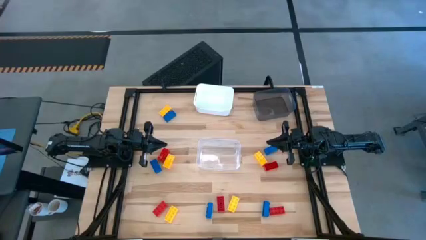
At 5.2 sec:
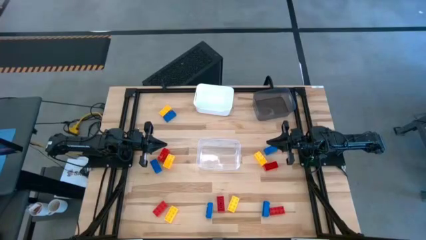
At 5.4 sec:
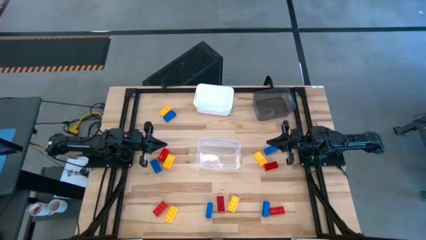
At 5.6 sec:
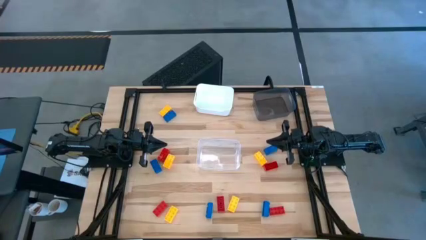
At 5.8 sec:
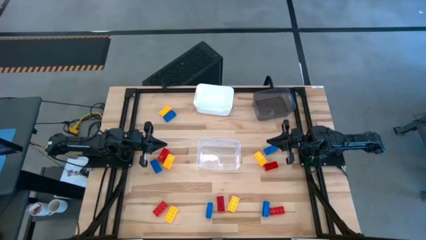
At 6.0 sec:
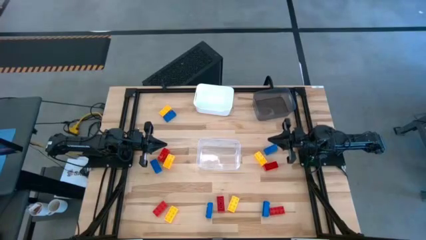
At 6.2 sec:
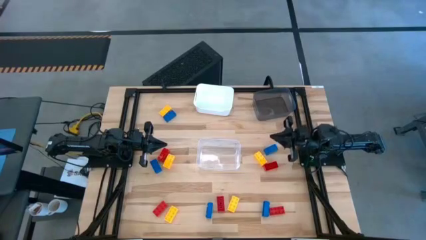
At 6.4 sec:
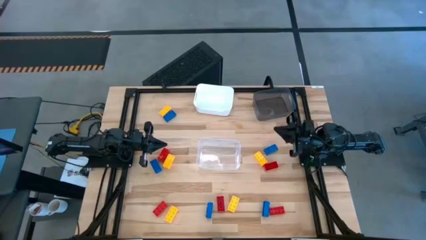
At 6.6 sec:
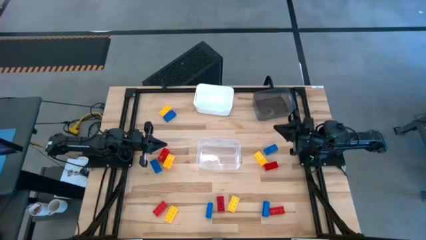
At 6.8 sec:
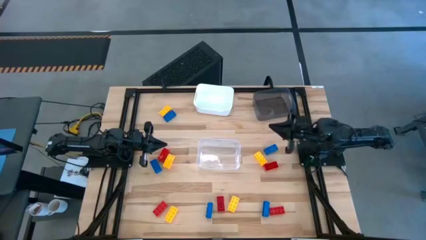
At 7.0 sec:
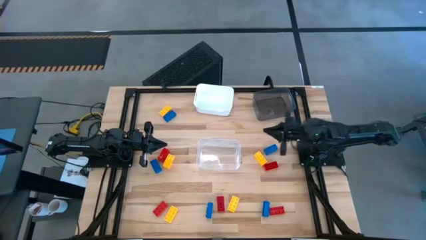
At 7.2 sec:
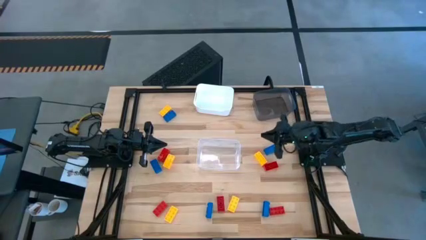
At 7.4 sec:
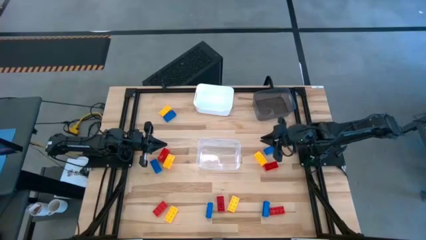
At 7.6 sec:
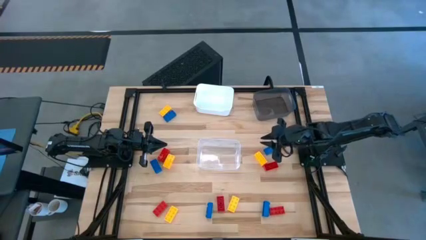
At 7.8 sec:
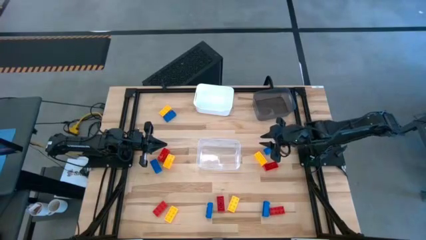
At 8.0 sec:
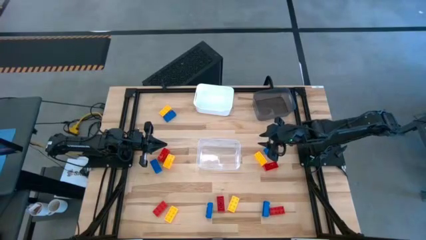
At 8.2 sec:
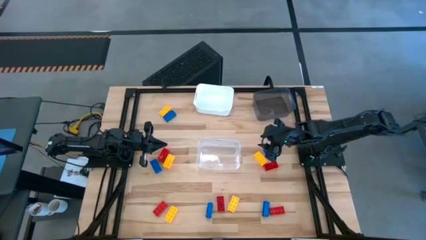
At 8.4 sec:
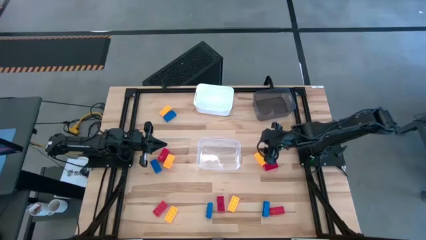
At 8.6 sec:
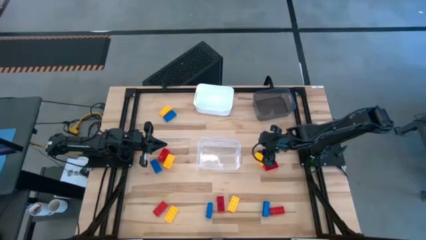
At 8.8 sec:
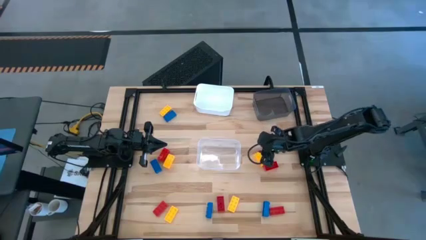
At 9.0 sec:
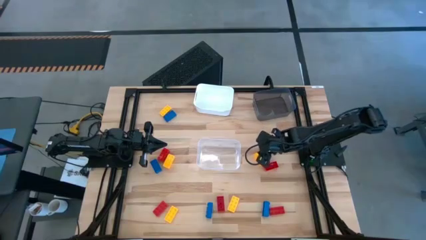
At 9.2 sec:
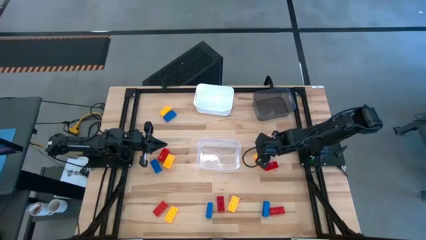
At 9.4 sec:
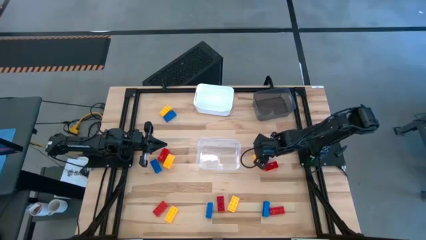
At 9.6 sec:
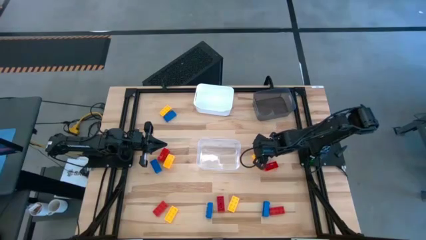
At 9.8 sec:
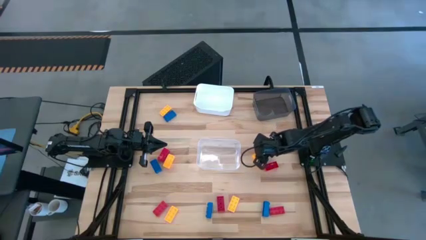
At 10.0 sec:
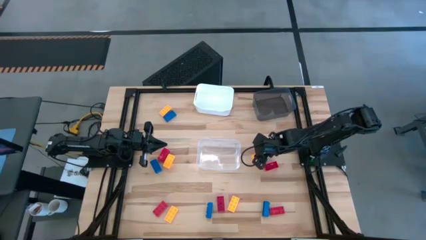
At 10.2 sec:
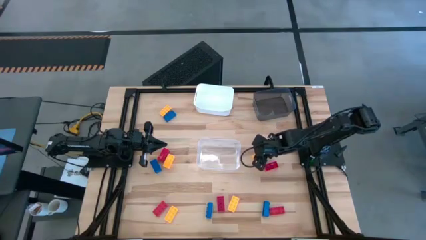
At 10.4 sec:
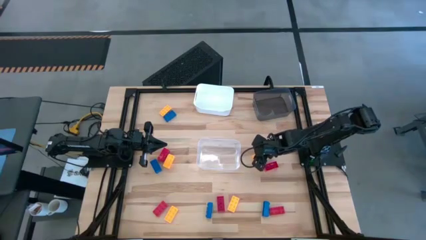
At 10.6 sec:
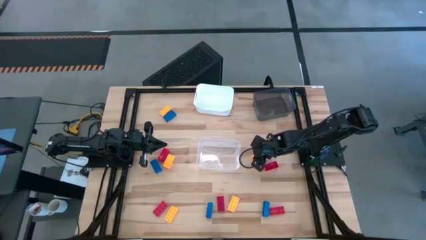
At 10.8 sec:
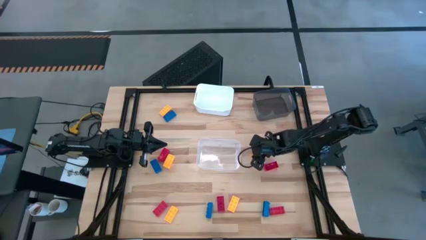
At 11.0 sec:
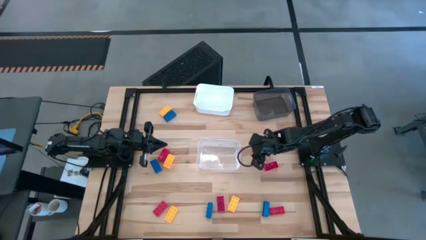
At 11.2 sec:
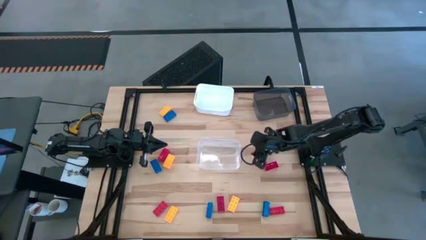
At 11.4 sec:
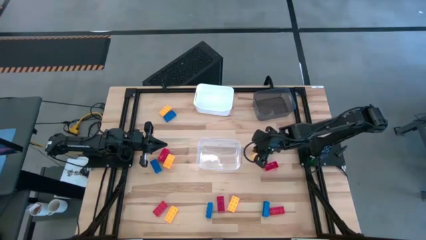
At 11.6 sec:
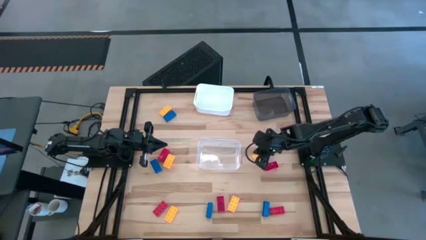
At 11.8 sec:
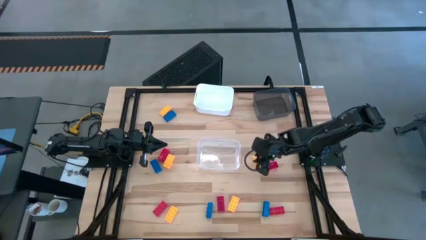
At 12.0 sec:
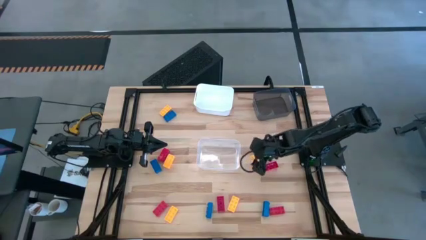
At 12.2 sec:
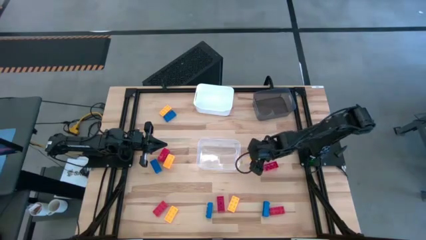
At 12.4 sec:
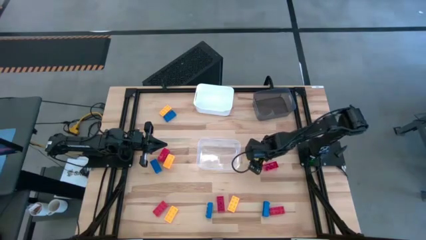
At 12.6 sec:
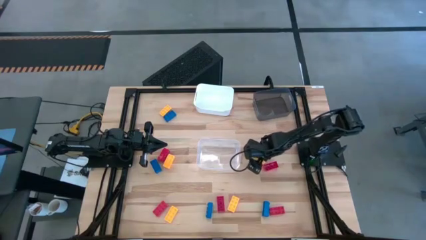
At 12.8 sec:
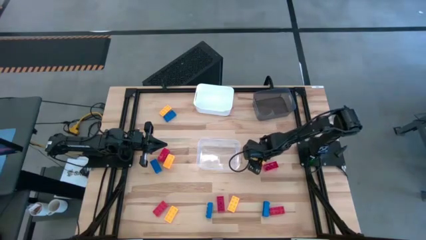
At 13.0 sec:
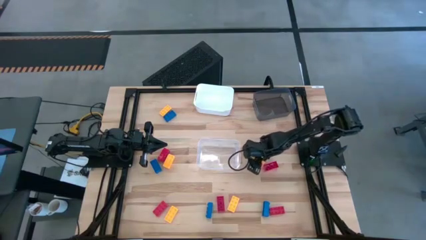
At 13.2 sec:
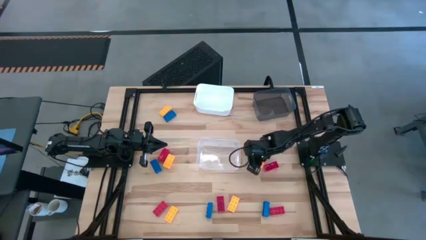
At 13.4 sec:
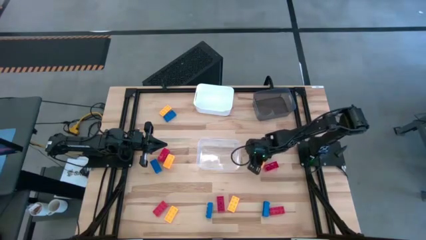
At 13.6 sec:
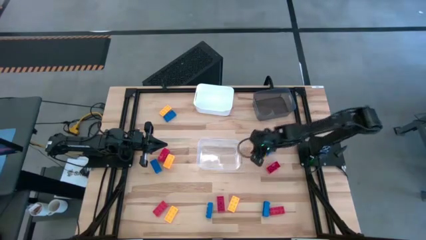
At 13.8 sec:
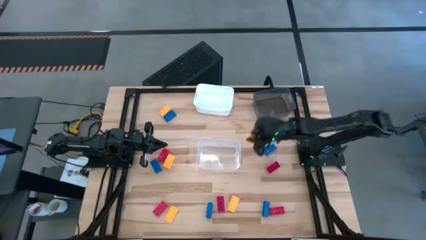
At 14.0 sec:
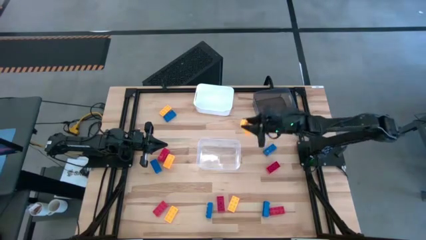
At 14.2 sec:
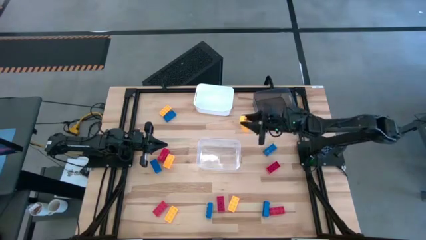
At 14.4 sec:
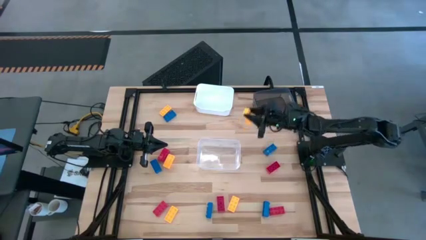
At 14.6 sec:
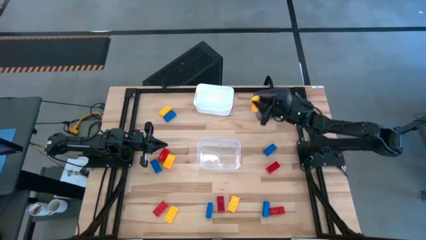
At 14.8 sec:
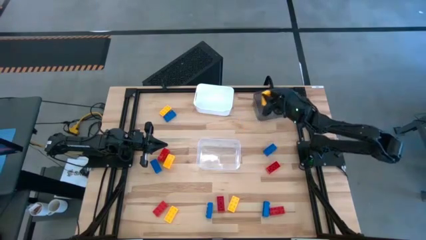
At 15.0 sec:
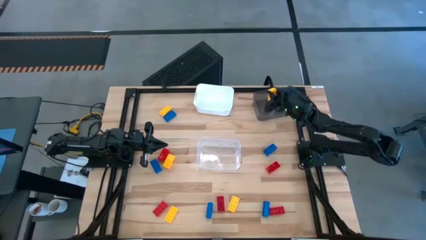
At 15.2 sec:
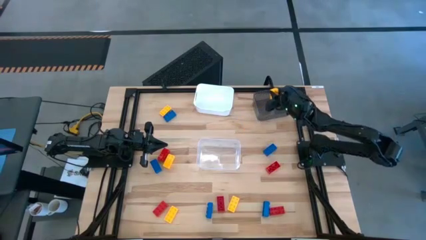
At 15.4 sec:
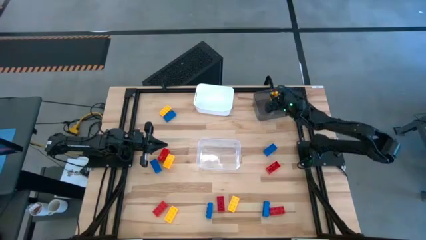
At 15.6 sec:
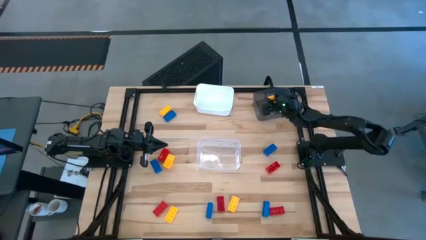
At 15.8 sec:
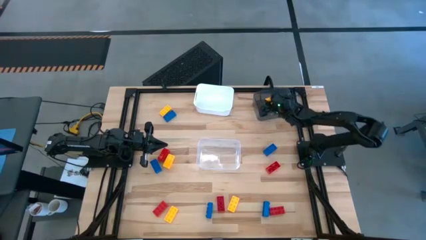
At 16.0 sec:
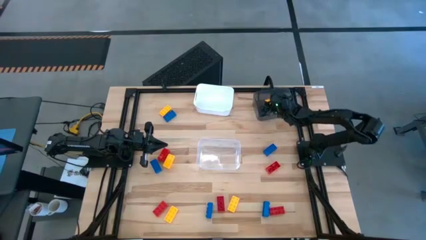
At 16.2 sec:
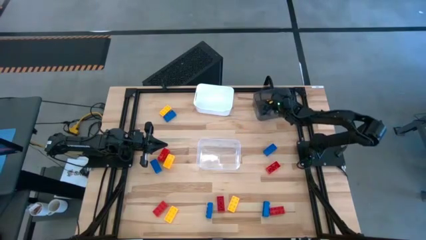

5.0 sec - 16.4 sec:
Task: Sort & place blocks by color
Put the middle right yellow block into the black bin
